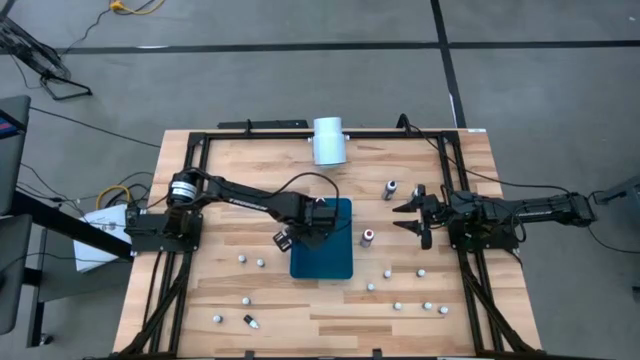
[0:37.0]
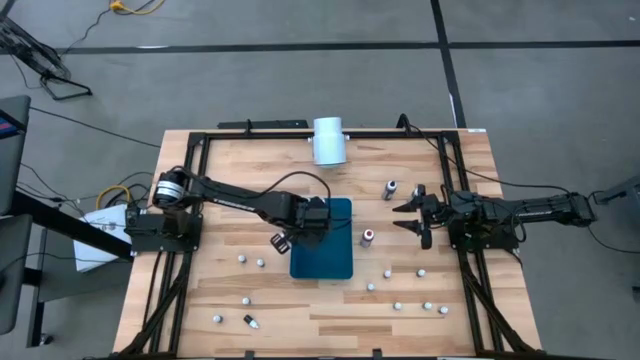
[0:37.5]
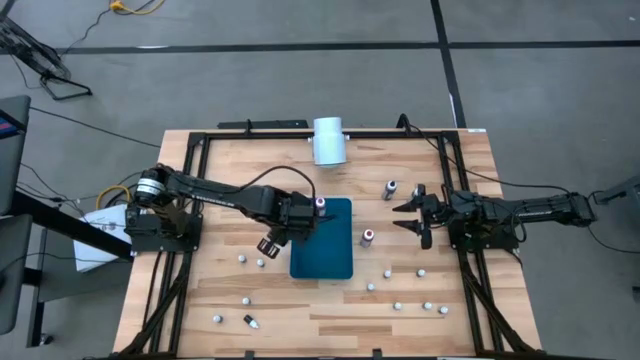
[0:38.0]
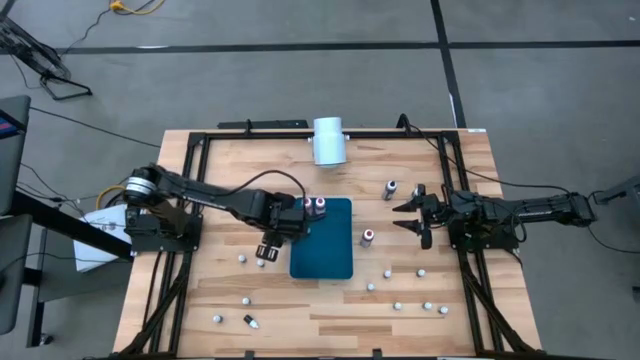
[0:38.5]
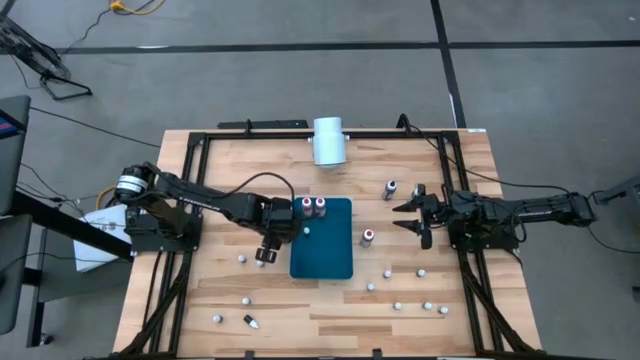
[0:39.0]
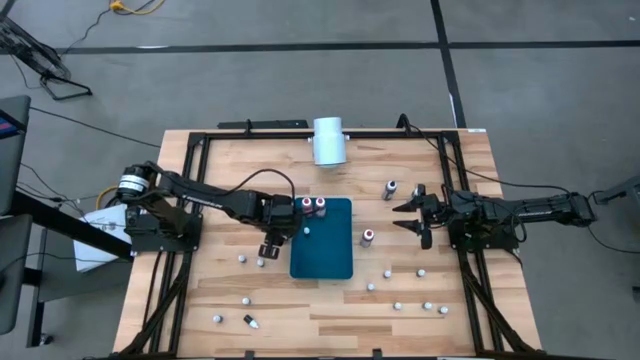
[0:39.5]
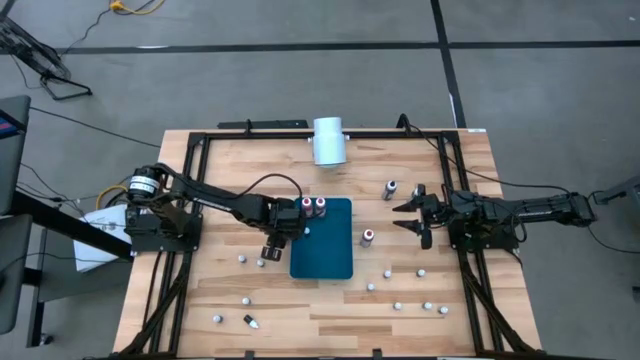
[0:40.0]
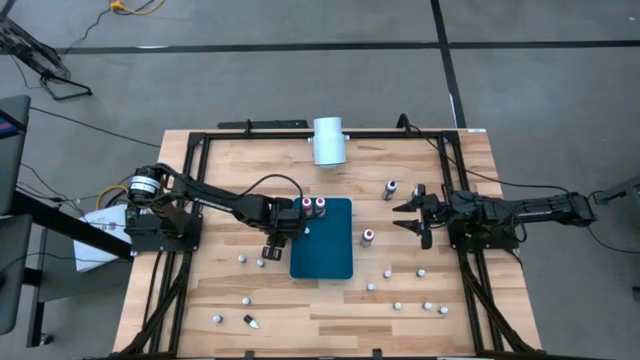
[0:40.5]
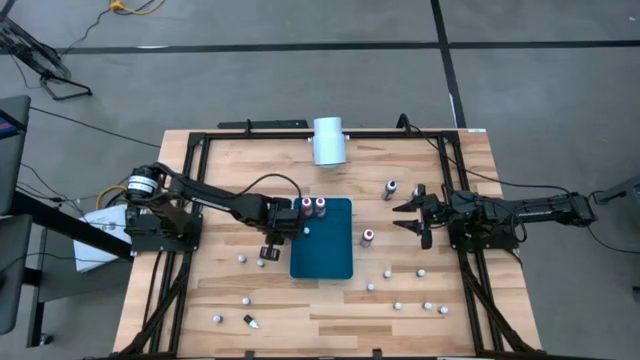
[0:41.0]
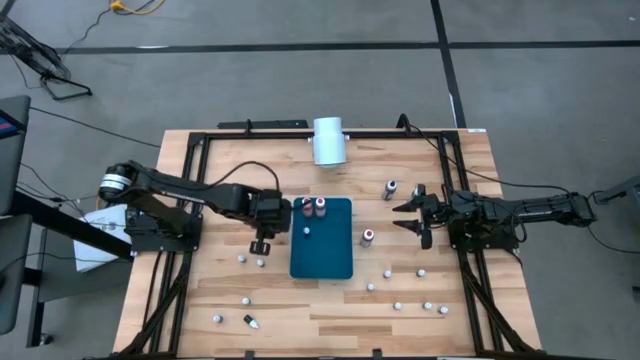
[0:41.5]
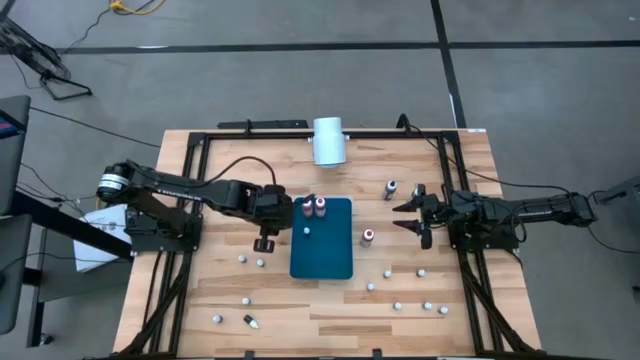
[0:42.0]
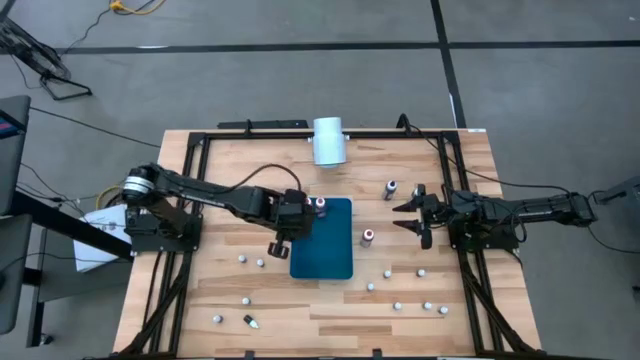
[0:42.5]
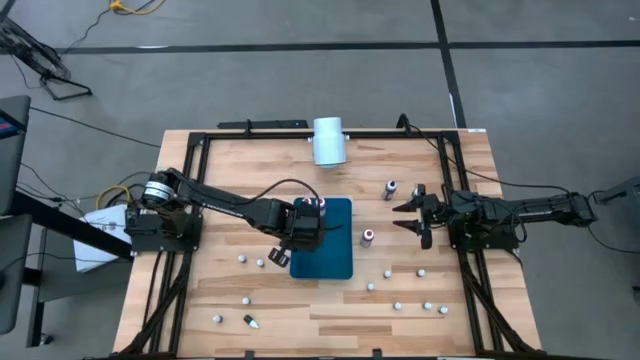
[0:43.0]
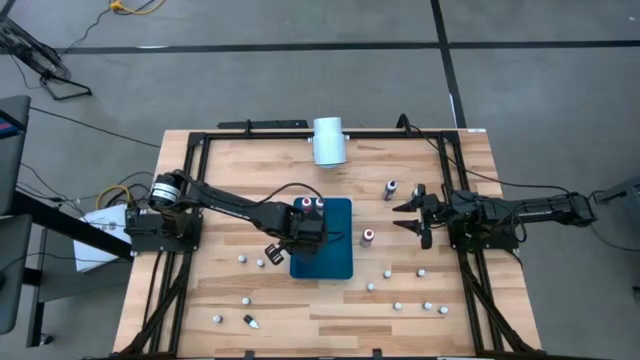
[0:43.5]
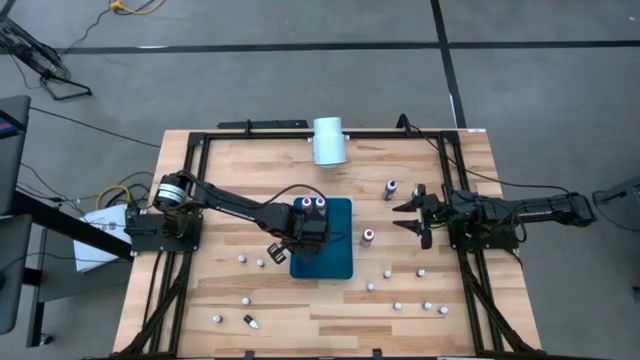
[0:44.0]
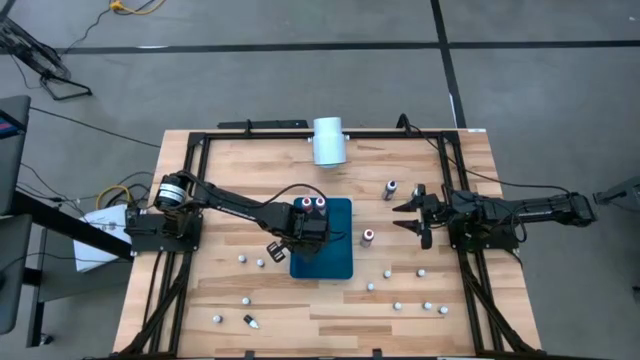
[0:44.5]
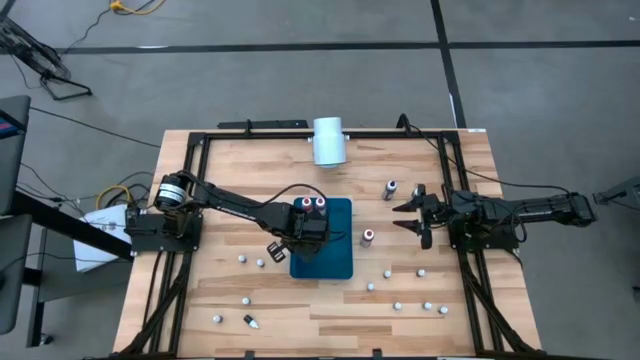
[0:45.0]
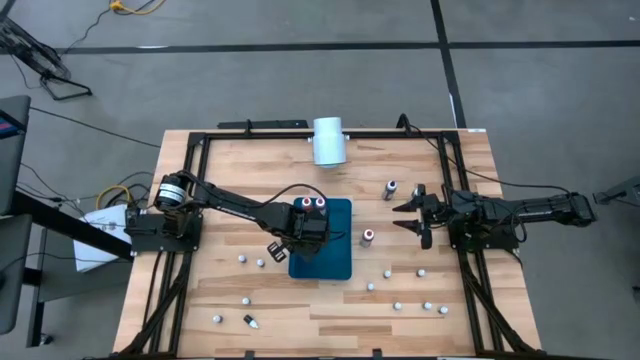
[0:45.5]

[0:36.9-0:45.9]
Task: Pick & Place food coloring
Put the small red food coloring bottle into the blue bin

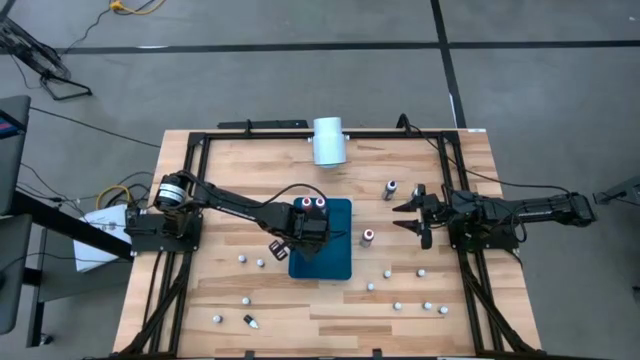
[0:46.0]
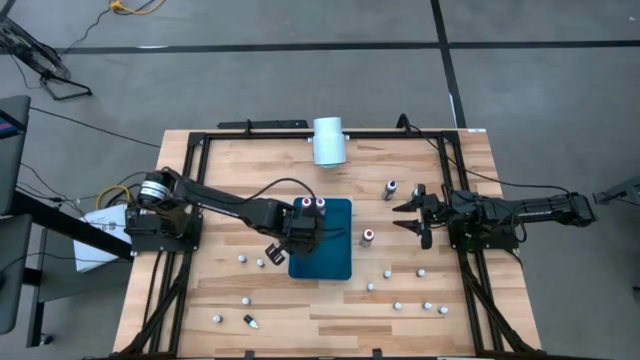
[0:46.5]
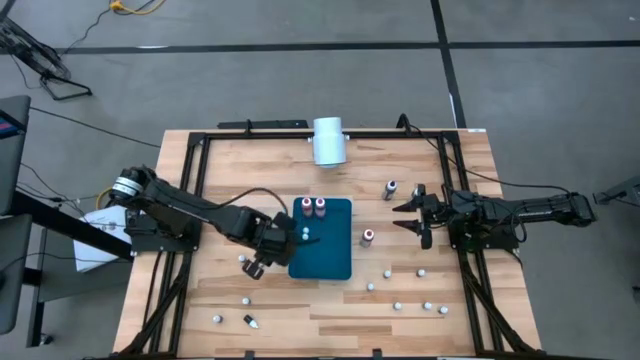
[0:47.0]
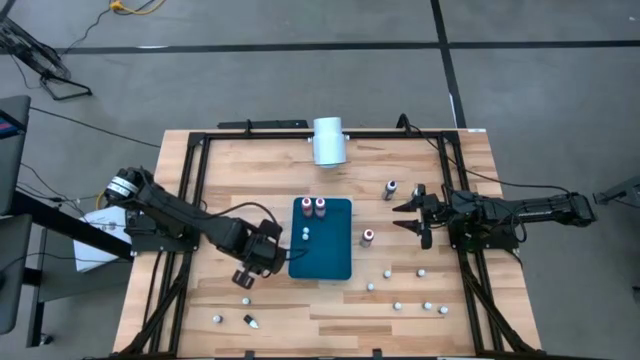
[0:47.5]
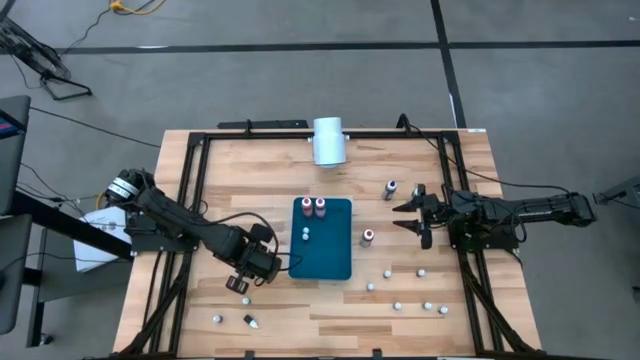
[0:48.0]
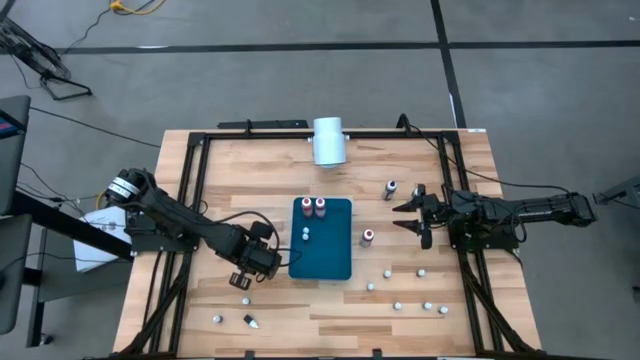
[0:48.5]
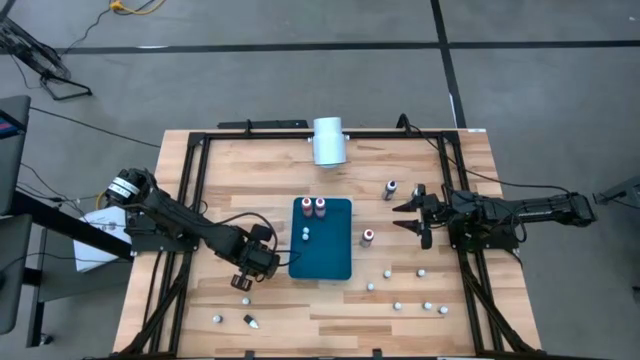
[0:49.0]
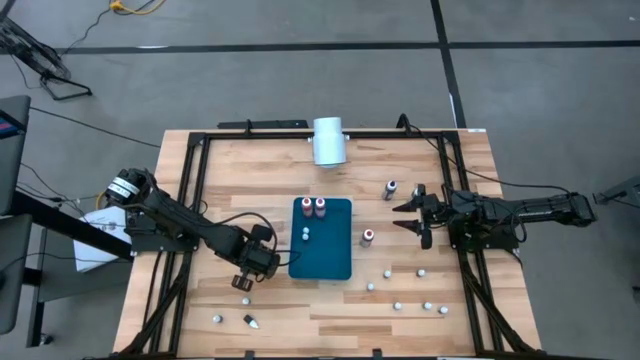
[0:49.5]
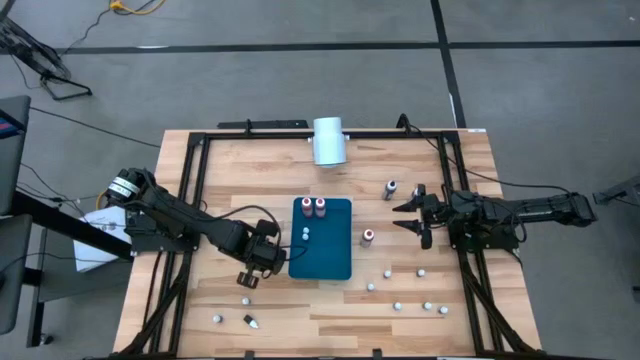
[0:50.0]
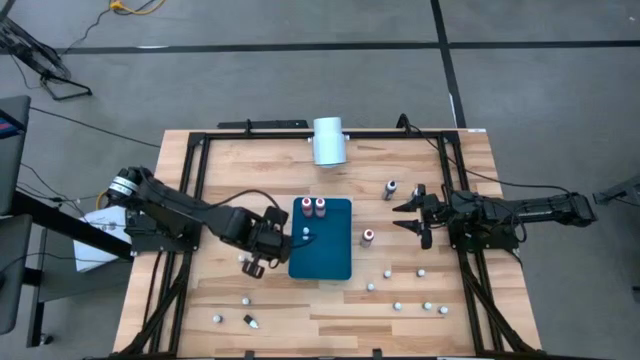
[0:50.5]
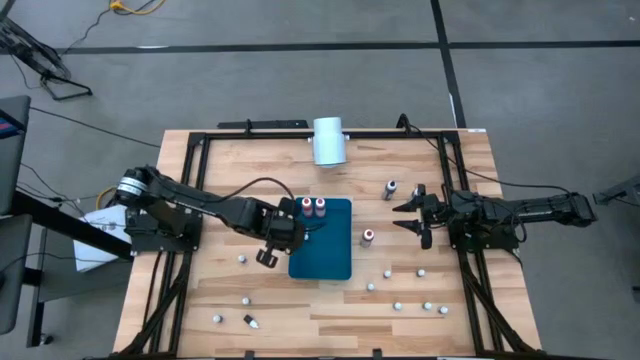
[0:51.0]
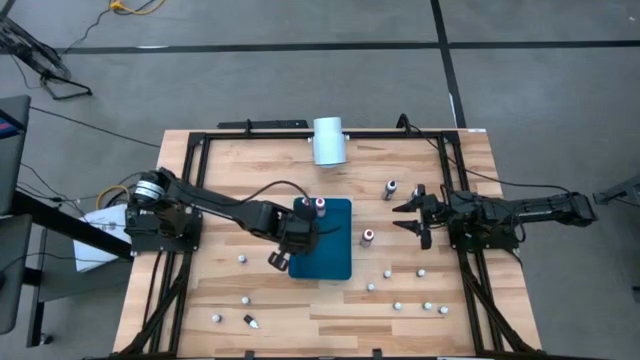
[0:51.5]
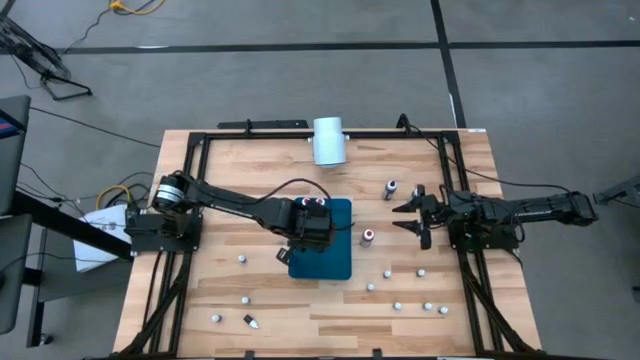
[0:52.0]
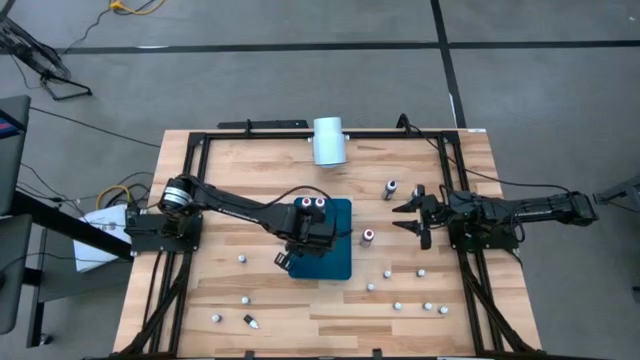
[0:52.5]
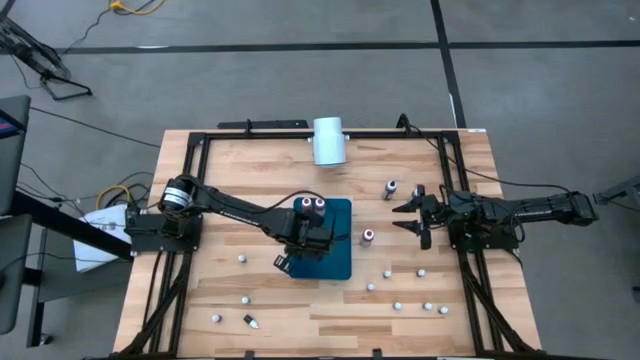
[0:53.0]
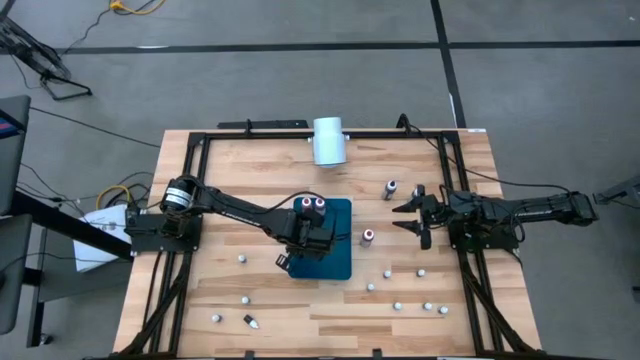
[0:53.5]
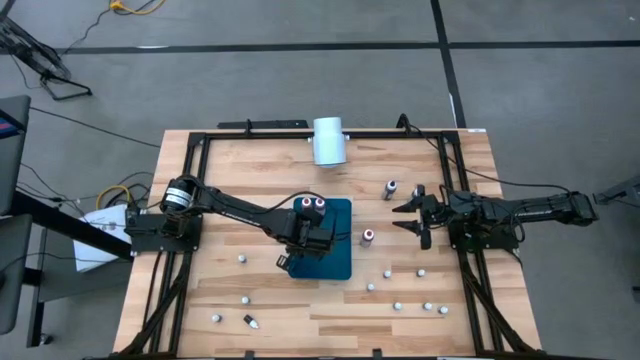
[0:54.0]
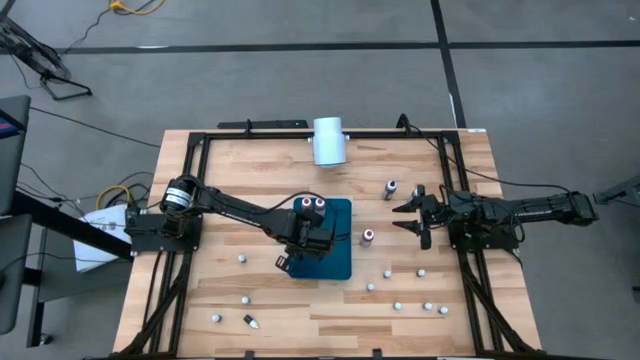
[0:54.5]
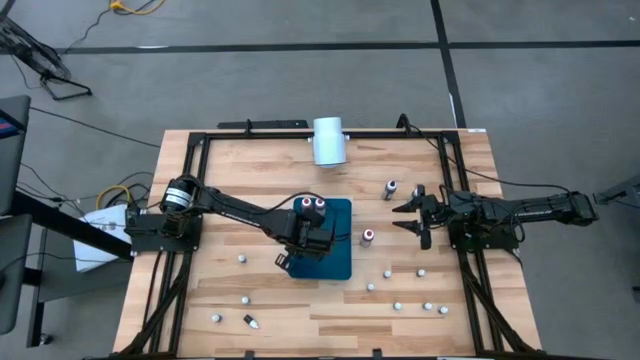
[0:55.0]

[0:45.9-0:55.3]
Put the small green food coloring bottle into the blue bin

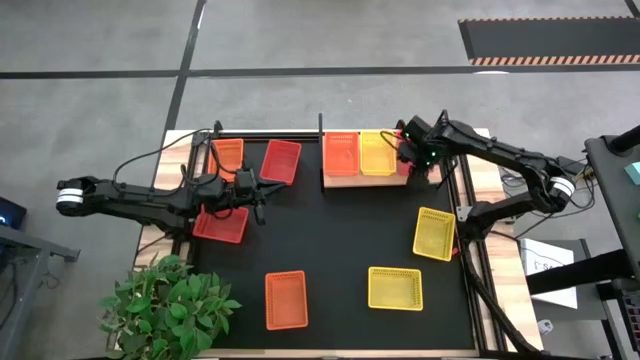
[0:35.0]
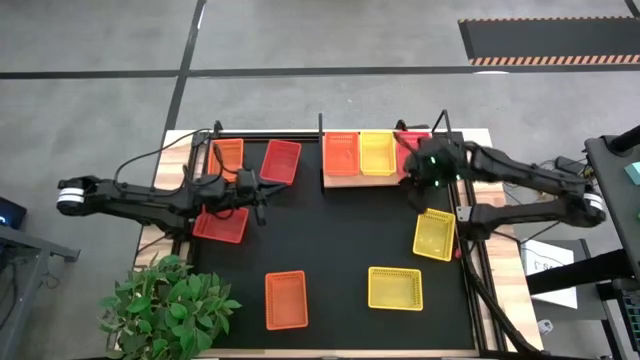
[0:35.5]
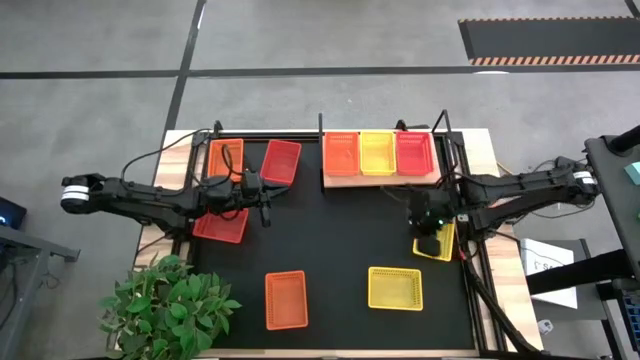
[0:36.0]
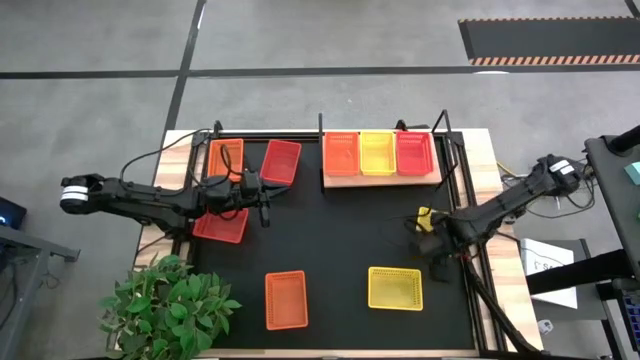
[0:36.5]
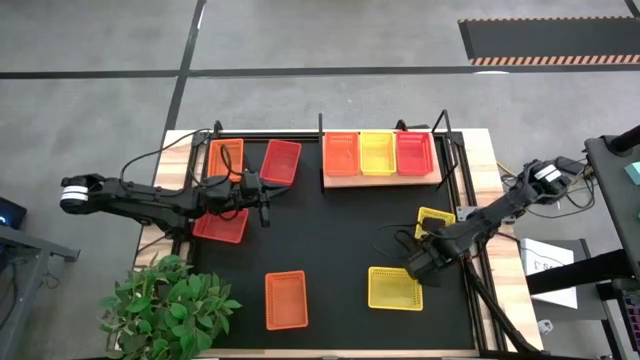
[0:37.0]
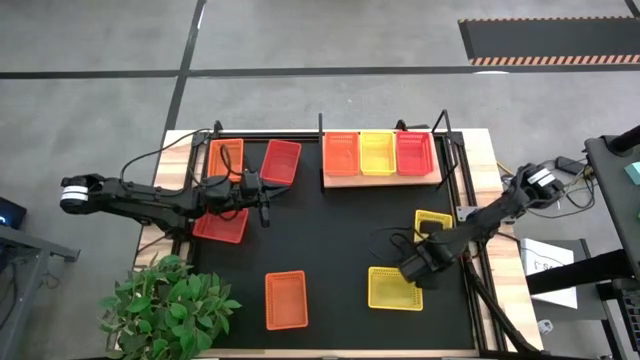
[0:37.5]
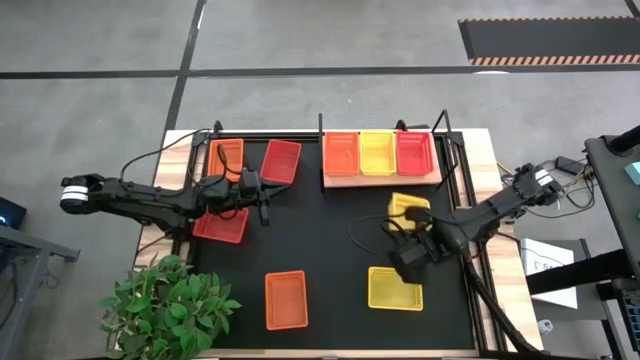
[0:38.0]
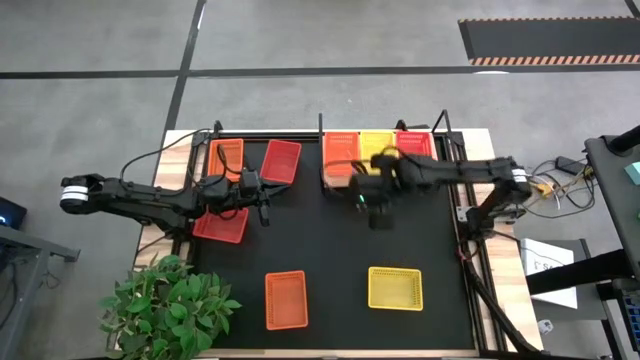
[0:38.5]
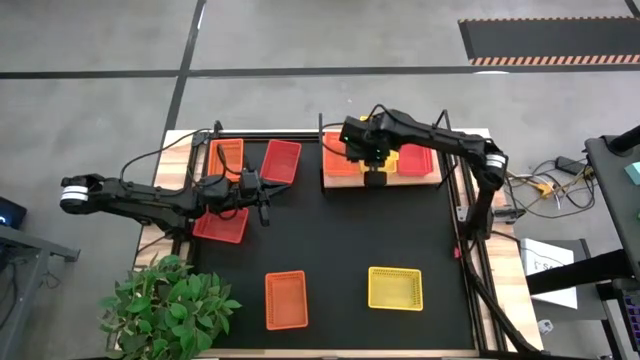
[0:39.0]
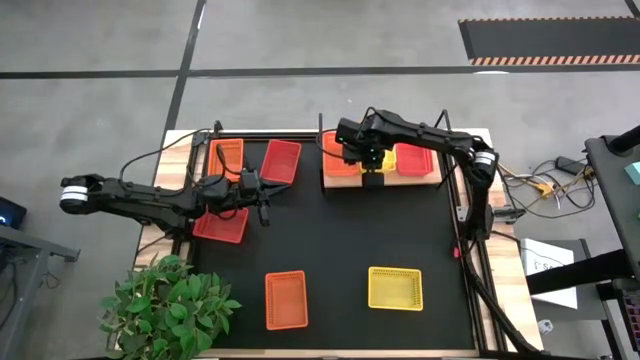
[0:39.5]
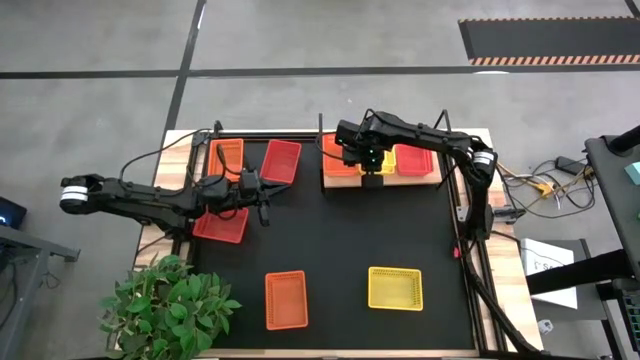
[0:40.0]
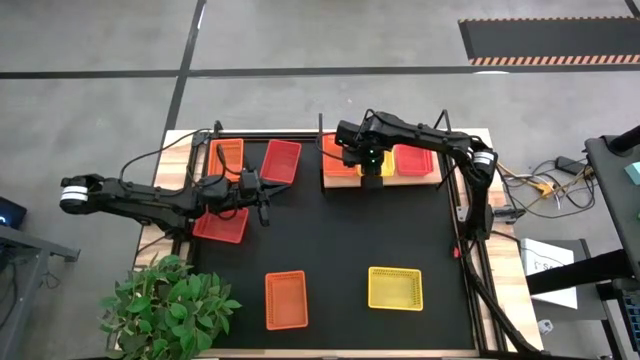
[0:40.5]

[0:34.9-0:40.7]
Task: Stack baskets on shelf by color
Stack the top yellow bin on the yellow bin on the shelf
